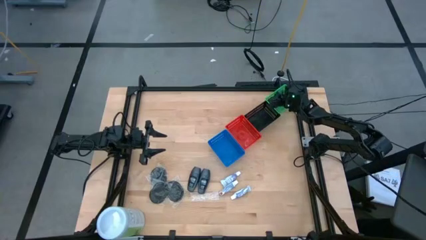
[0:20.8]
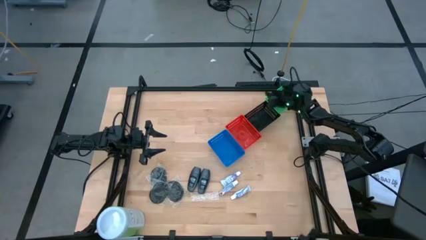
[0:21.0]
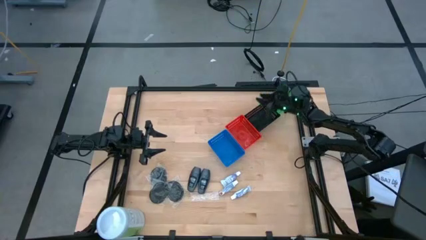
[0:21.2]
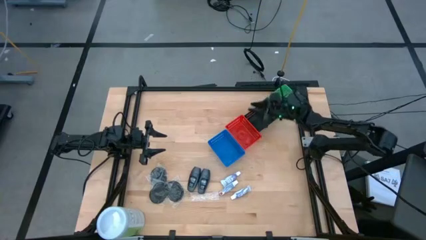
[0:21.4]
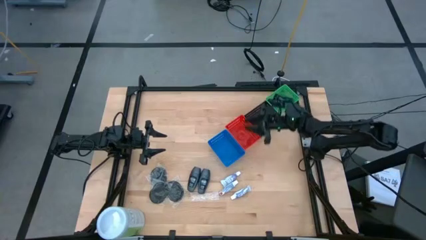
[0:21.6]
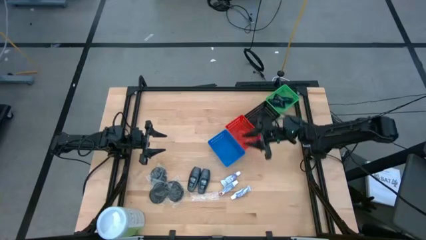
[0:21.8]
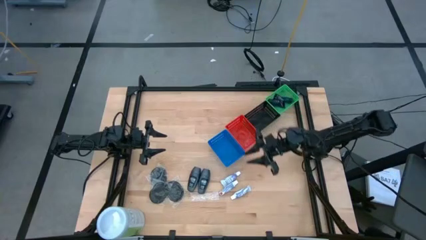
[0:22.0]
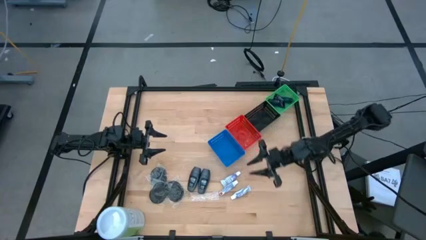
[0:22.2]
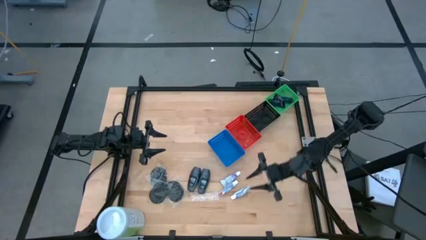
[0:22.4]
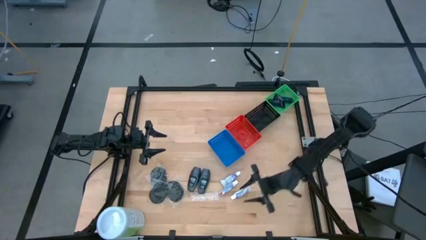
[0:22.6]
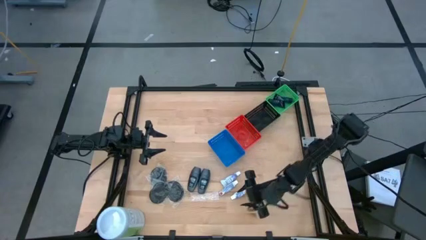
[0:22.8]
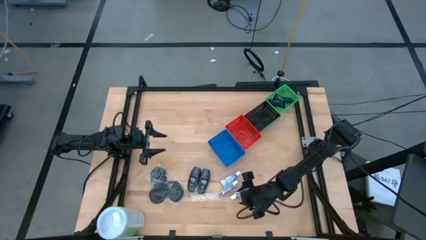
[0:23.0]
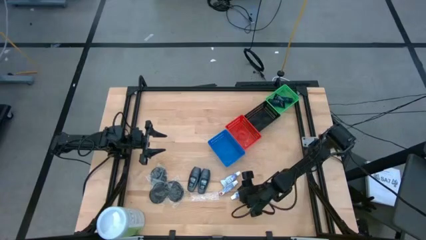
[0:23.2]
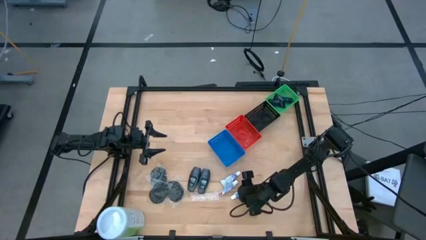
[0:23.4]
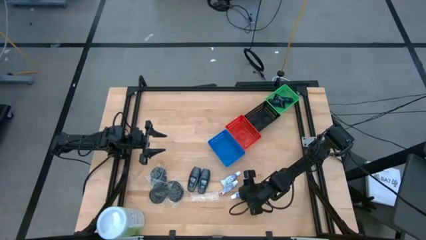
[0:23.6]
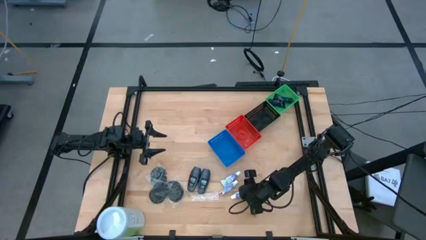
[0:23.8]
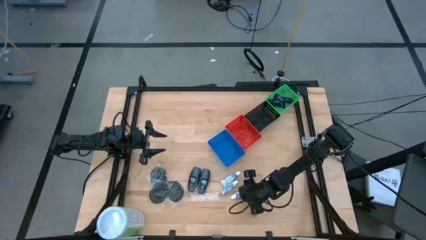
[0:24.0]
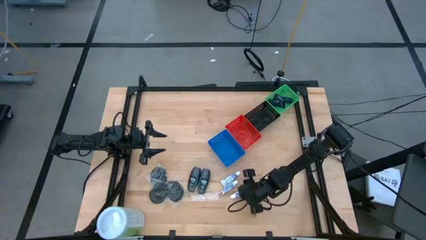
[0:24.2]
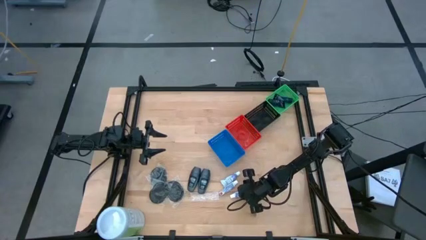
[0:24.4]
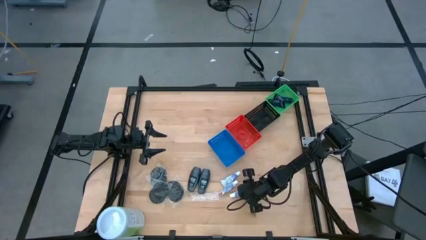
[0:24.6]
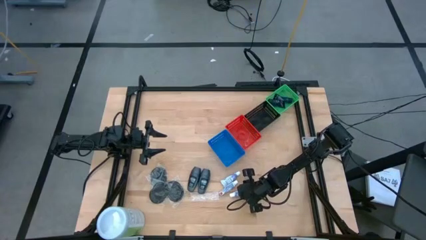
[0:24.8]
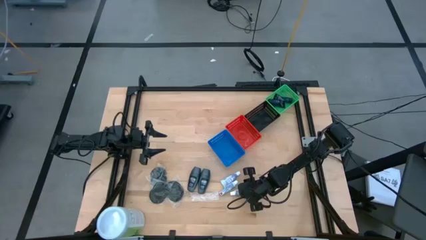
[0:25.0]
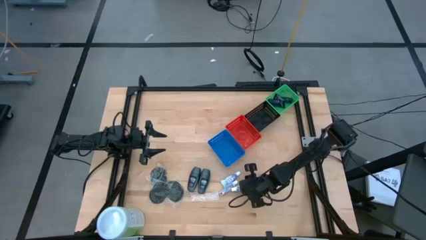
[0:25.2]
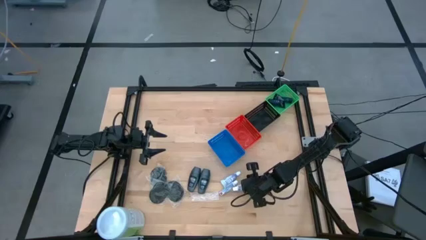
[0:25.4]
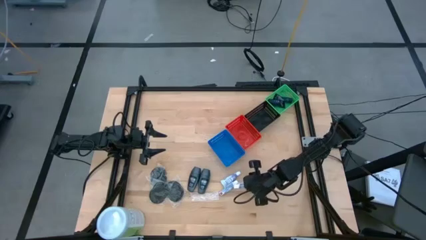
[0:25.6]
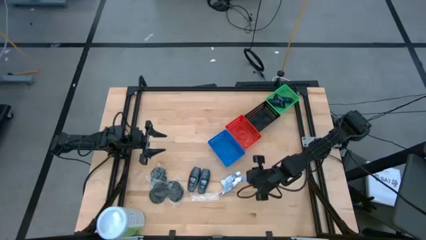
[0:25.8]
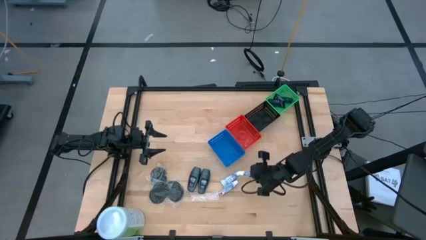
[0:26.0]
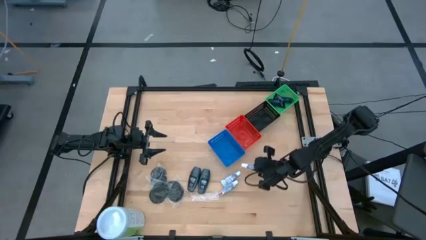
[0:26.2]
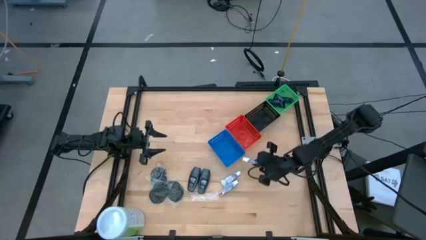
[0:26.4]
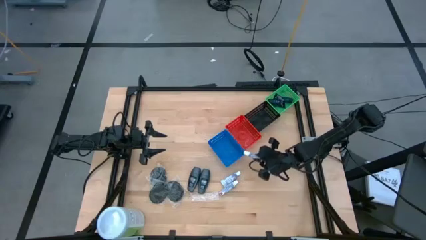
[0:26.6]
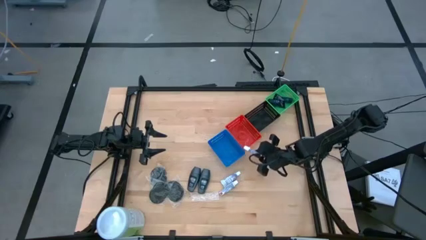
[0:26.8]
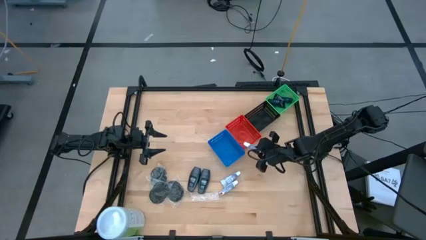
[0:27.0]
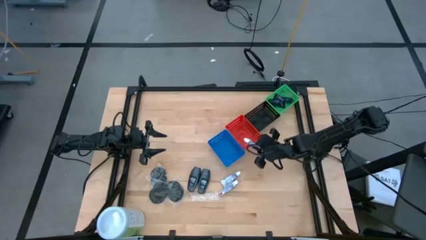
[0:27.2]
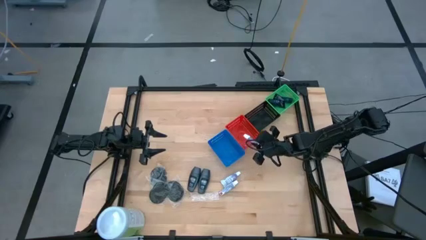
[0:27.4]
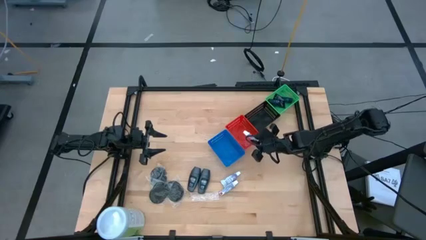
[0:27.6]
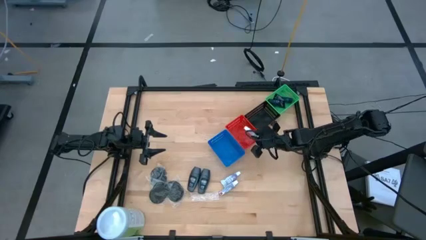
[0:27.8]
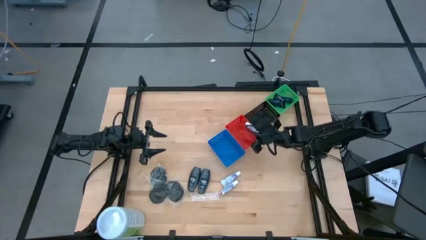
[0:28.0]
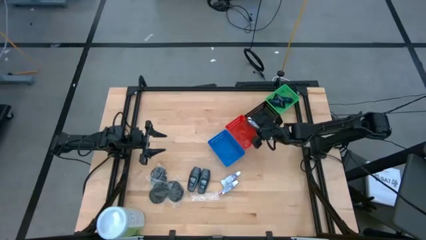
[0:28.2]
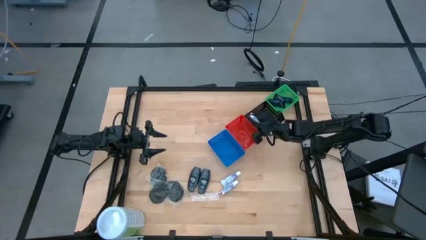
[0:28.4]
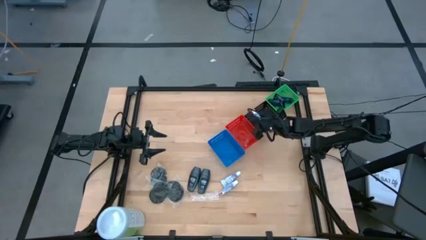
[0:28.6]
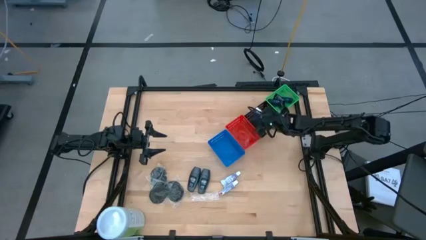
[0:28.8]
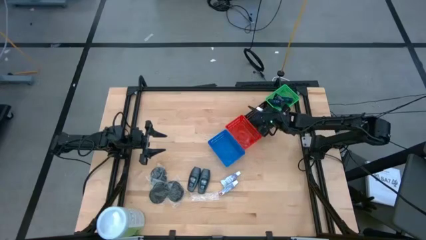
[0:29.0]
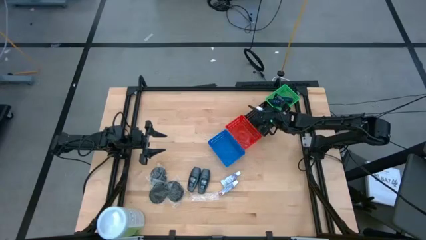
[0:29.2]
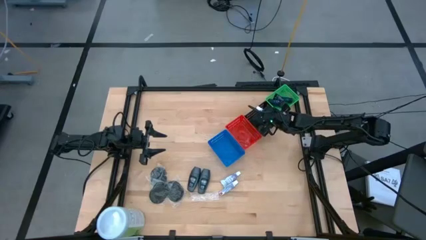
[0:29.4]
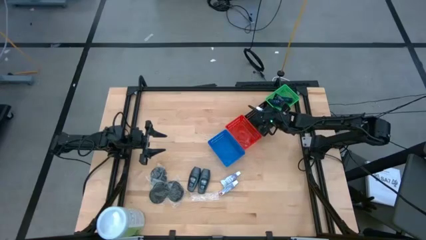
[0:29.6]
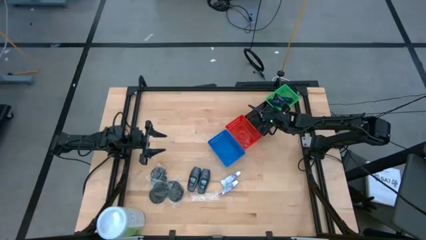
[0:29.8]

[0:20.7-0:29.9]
Task: Pick & Place Travel size toiletries
Put the bottom toothpaste into the black bin

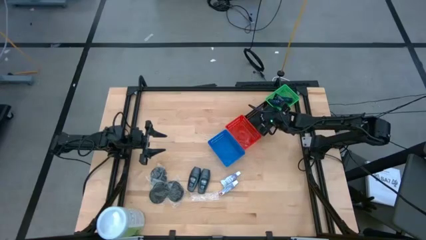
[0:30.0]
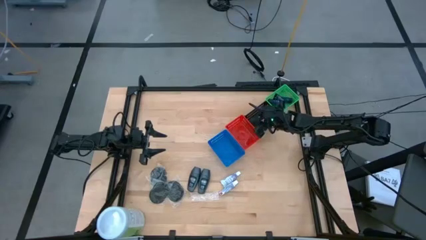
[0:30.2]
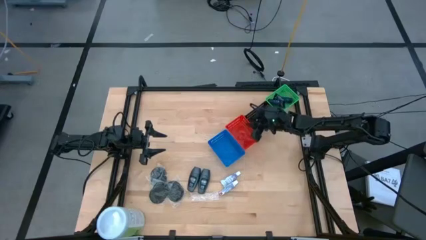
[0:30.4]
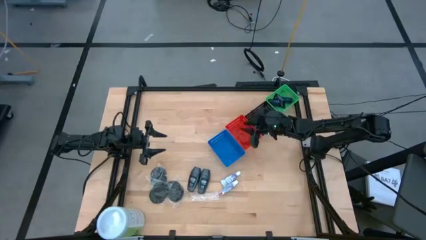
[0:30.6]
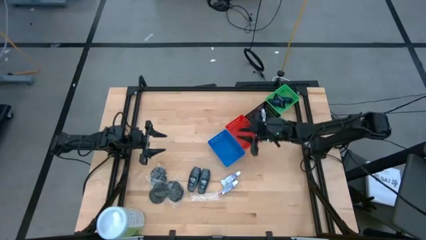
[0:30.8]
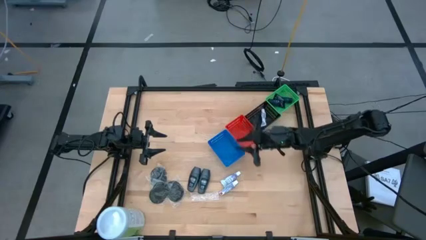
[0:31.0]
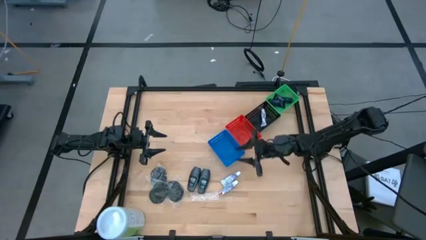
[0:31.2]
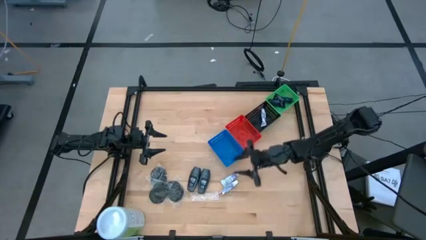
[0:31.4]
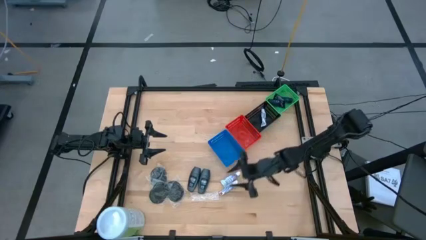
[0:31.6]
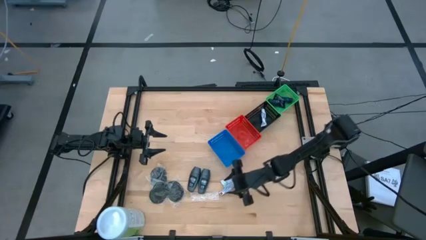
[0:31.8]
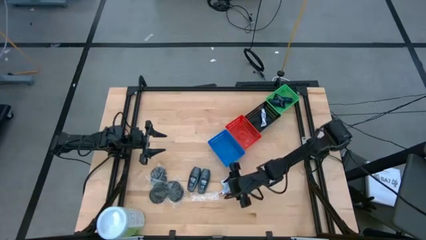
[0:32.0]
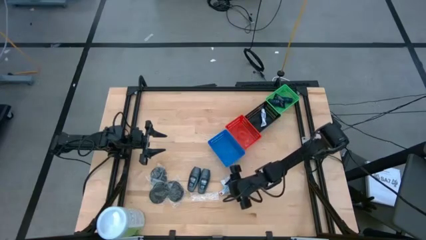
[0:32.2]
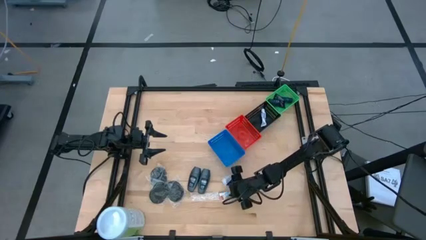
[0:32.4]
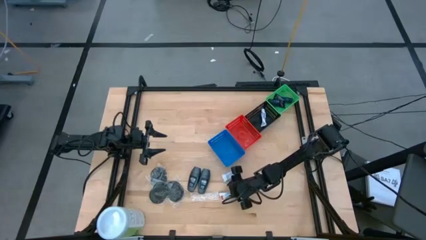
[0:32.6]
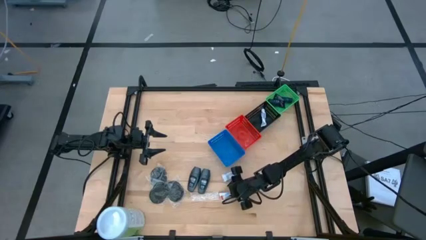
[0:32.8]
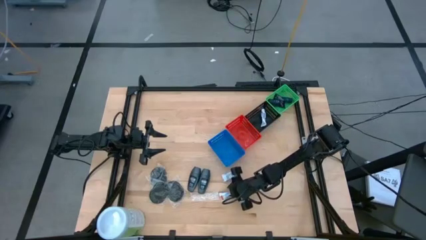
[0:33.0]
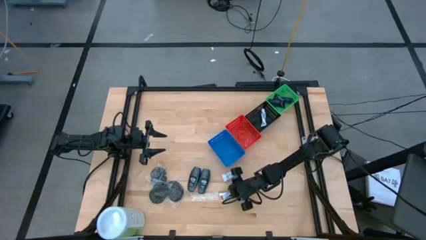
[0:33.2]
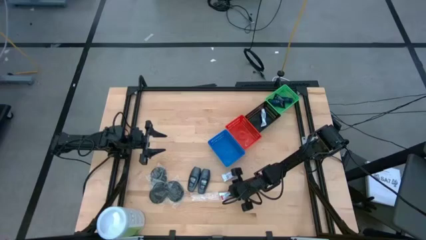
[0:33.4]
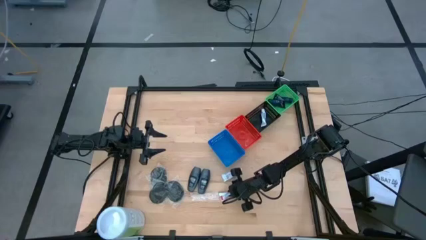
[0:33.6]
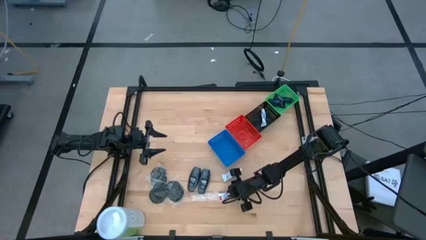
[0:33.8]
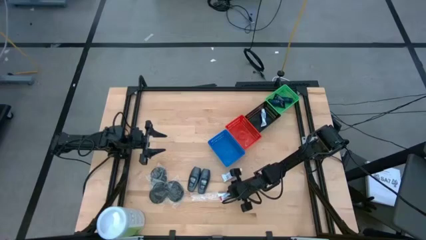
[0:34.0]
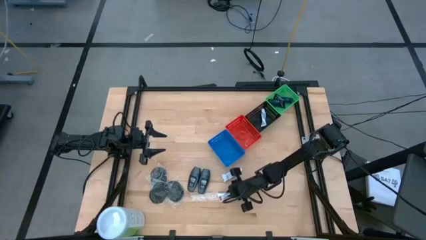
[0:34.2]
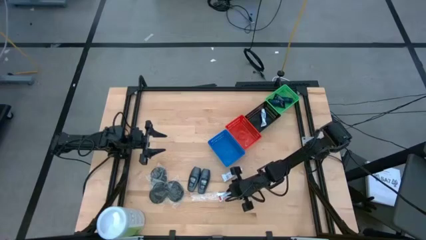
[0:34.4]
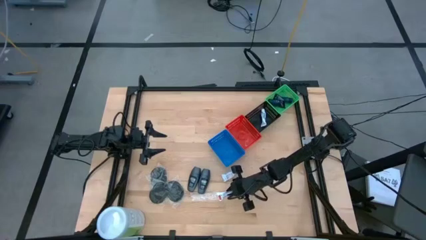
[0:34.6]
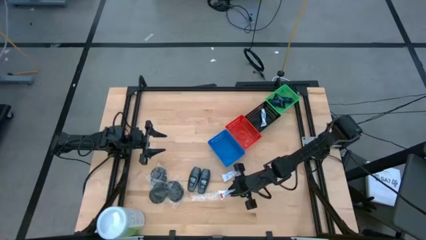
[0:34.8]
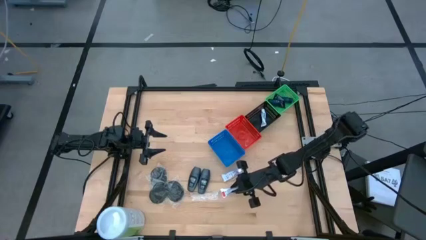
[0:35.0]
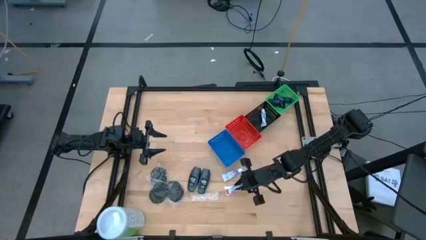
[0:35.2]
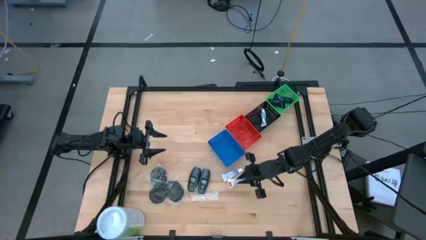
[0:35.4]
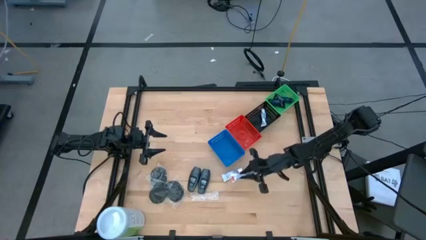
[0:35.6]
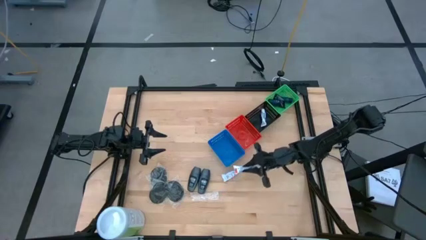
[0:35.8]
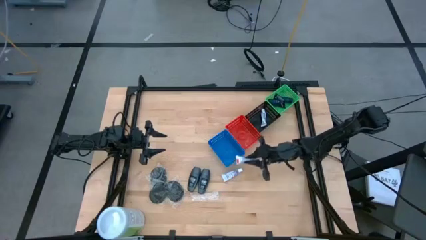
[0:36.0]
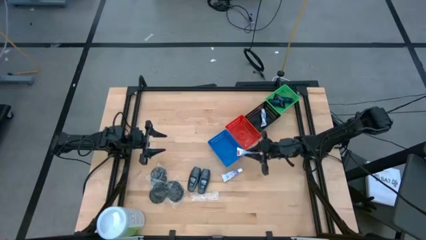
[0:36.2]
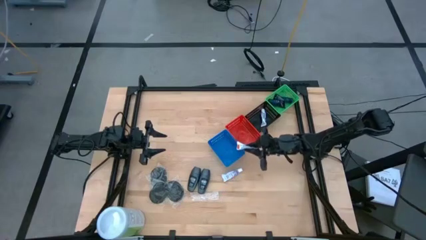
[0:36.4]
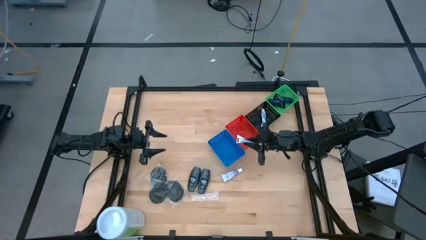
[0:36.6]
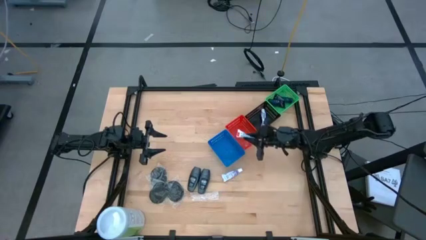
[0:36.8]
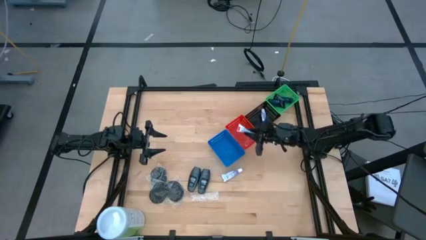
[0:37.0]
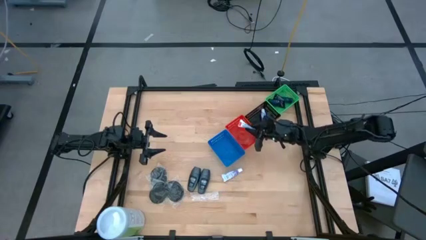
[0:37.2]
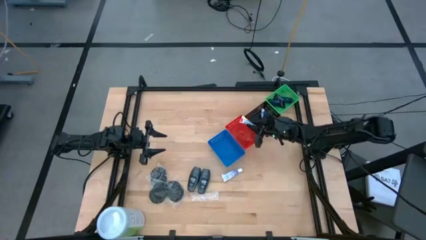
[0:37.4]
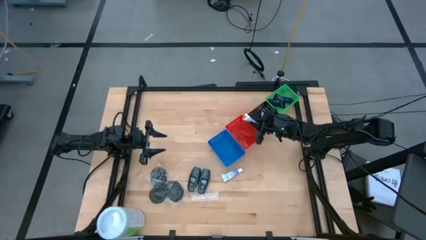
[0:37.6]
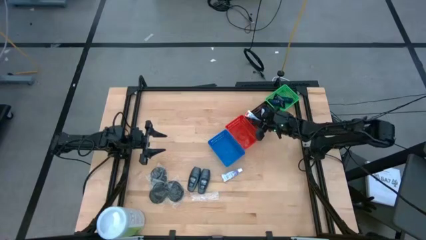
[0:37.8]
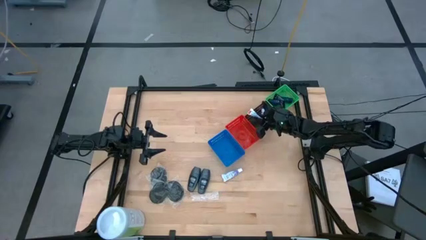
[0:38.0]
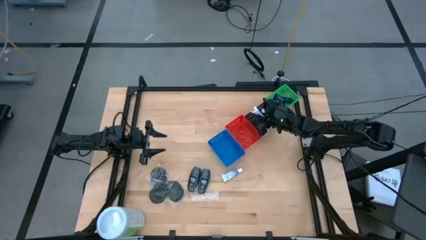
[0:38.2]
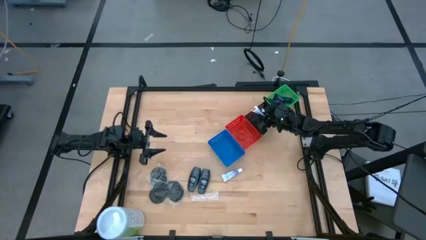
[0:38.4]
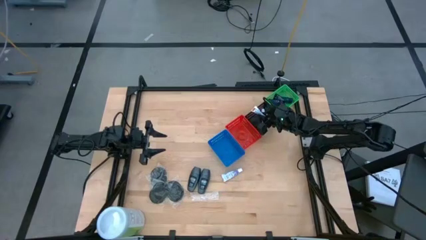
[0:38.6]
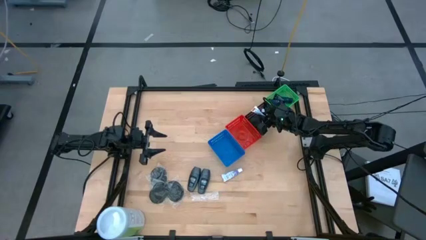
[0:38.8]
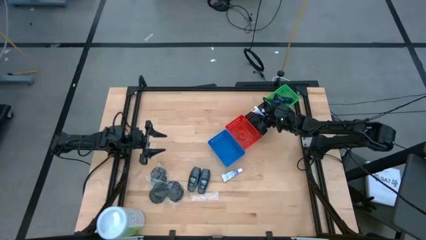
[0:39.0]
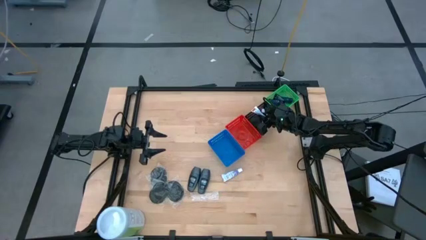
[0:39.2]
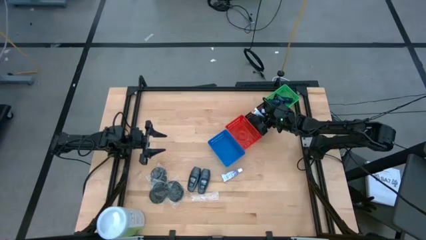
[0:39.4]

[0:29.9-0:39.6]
Put the bottom toothpaste into the black bin
